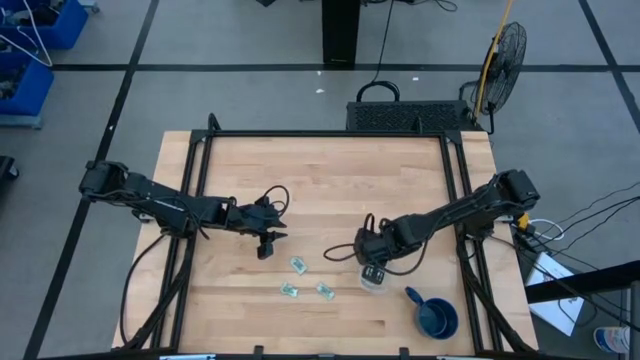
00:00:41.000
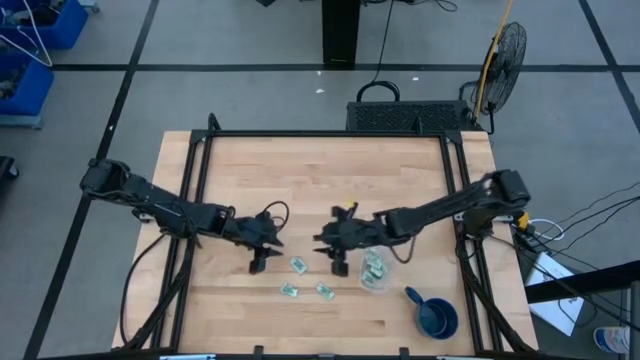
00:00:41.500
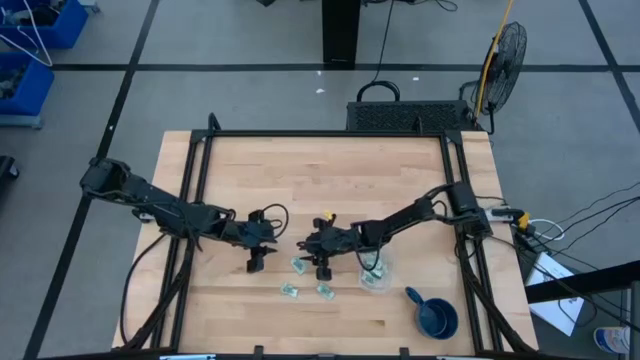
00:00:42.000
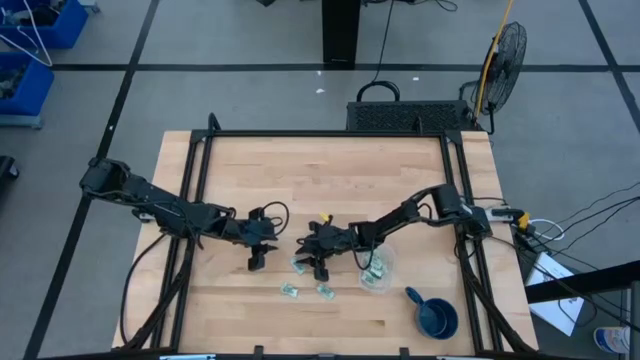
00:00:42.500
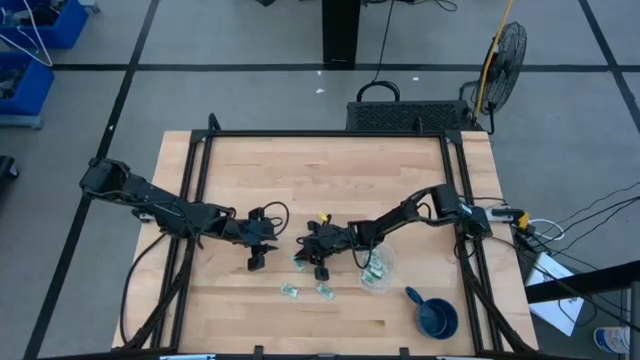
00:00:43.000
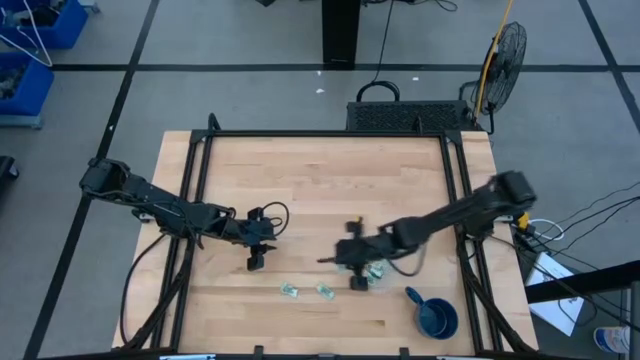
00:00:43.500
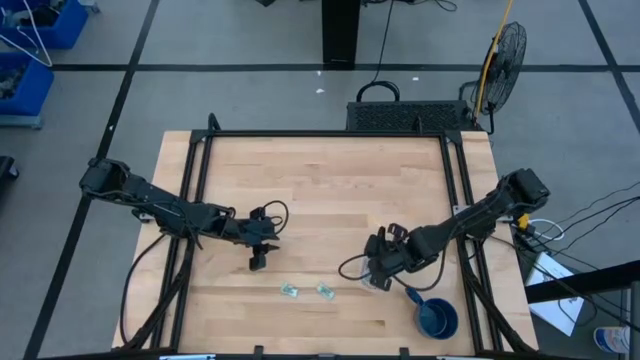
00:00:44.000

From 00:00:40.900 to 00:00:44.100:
Task: Pick and place Stevia / Truvia into bins
Put the stevia packet into the transparent container

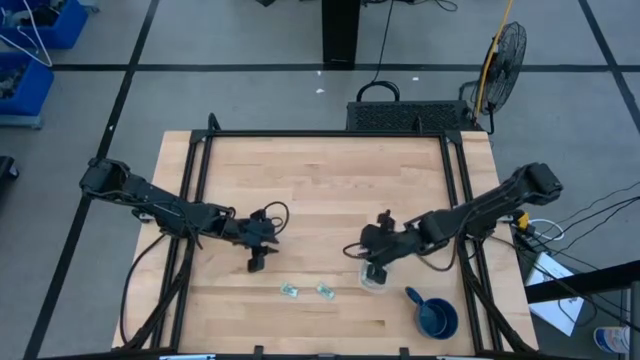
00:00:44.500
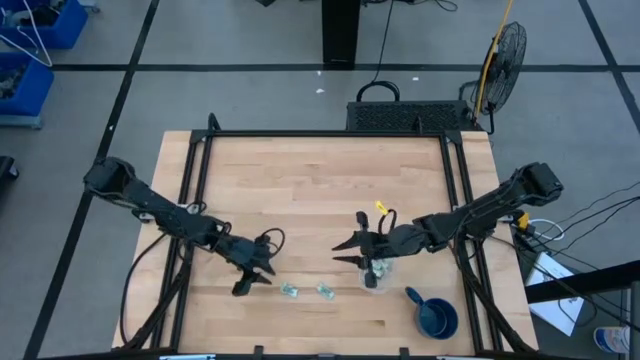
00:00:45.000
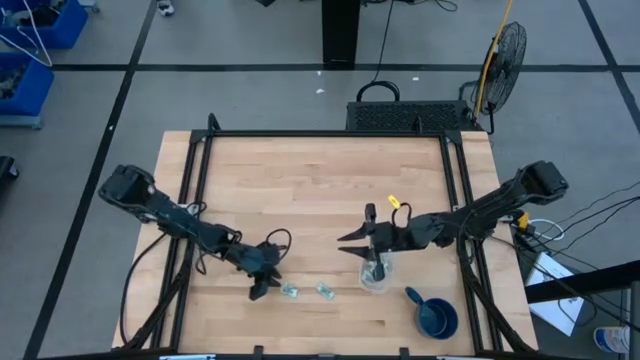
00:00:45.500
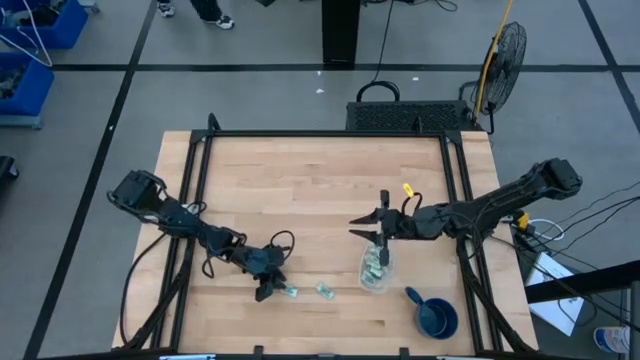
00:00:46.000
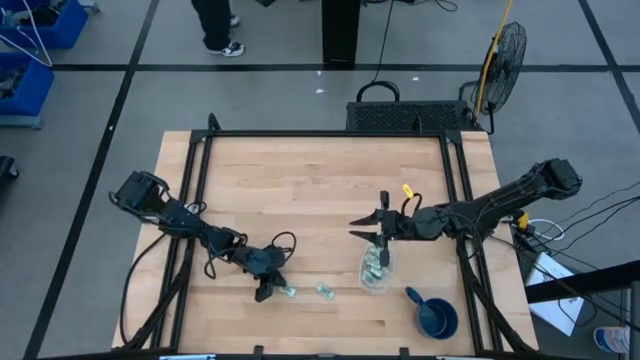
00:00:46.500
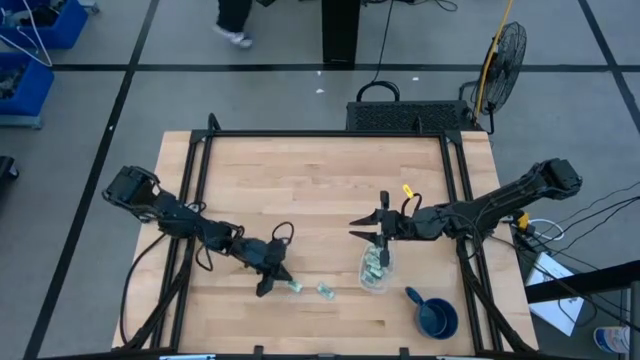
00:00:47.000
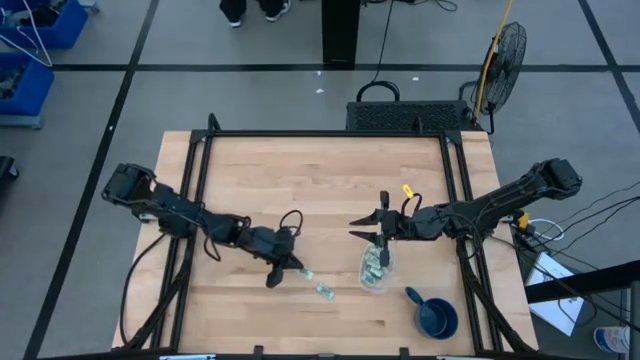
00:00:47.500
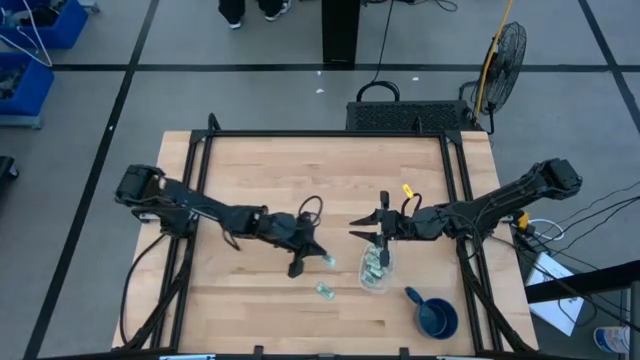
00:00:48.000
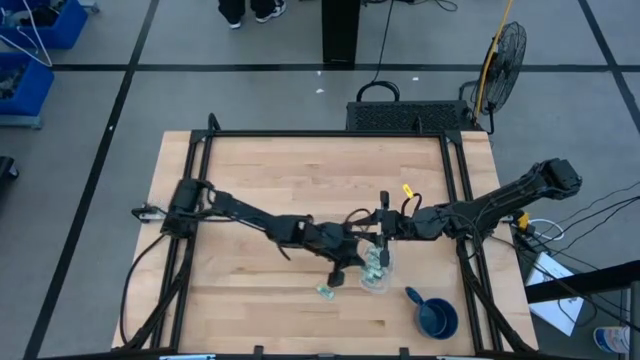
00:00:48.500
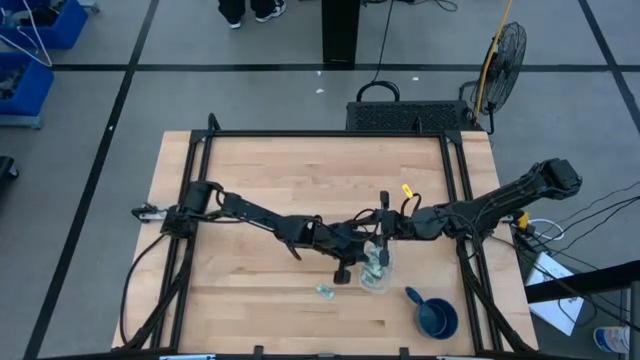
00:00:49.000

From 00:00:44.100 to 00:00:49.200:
Put the stevia packet into the transparent container

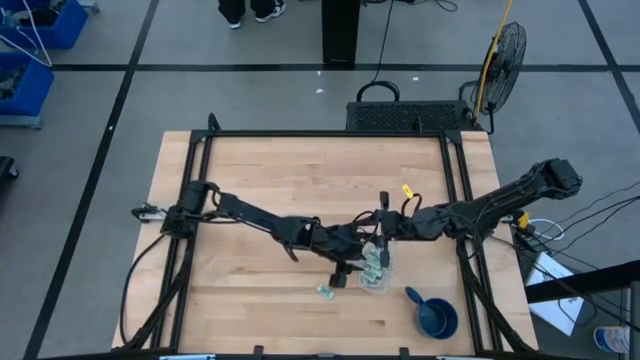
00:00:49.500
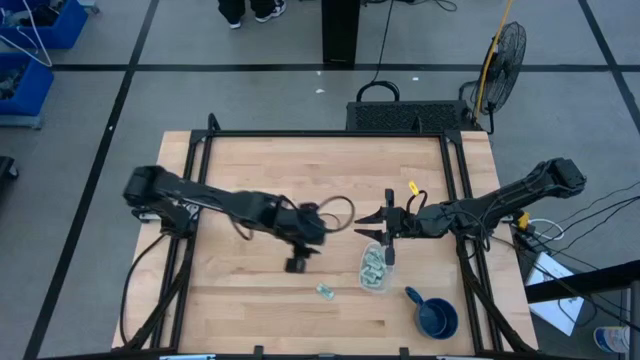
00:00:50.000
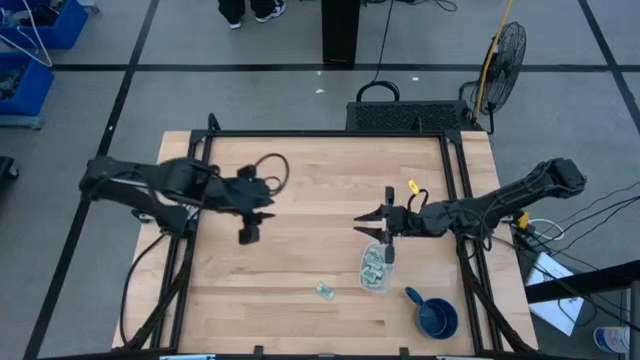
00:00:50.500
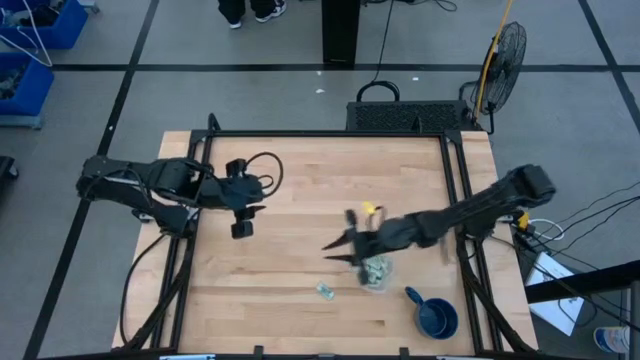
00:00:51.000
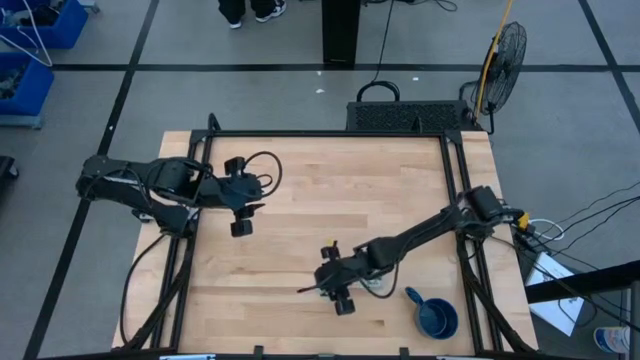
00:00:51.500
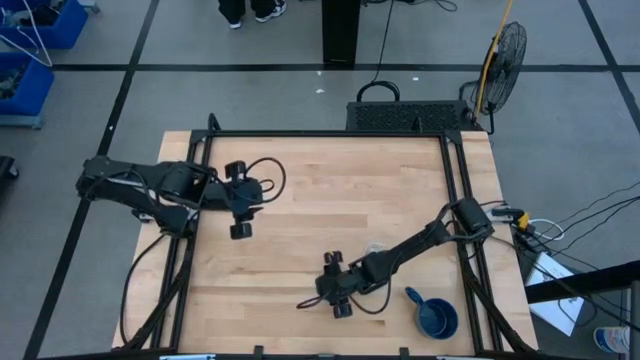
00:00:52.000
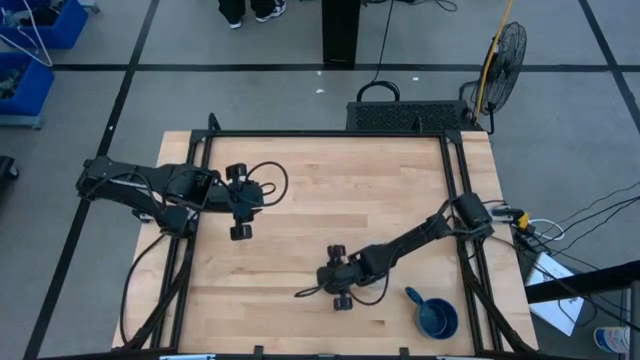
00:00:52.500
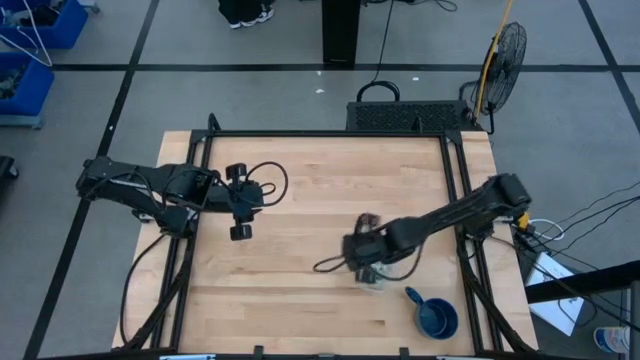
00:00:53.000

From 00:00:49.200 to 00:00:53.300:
Put the stevia packet into the transparent container

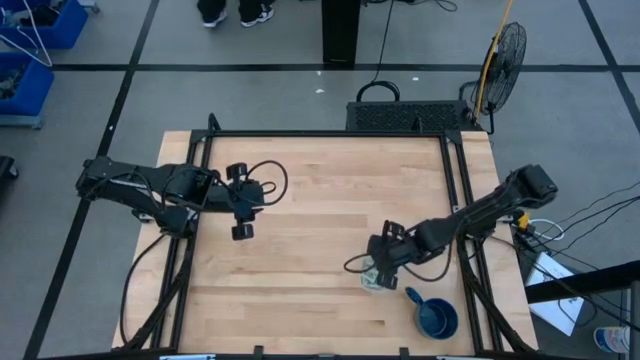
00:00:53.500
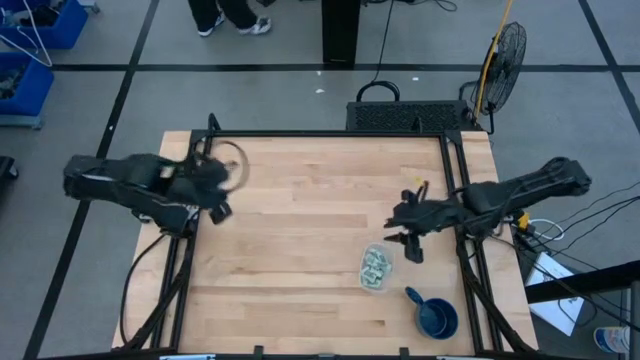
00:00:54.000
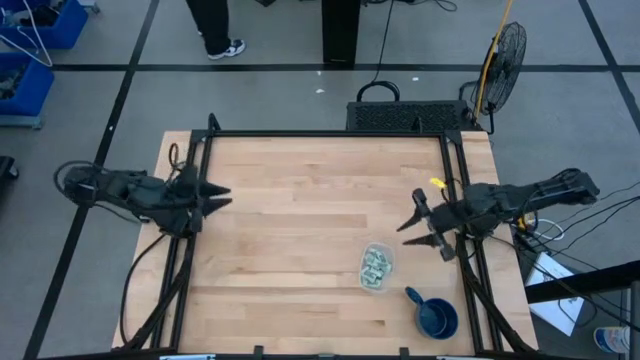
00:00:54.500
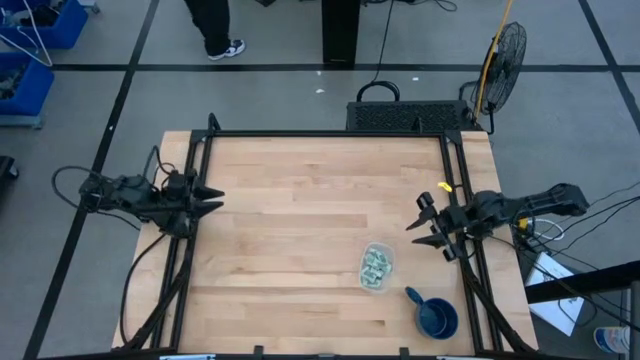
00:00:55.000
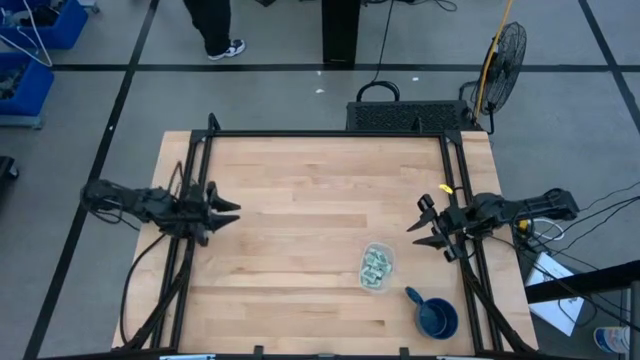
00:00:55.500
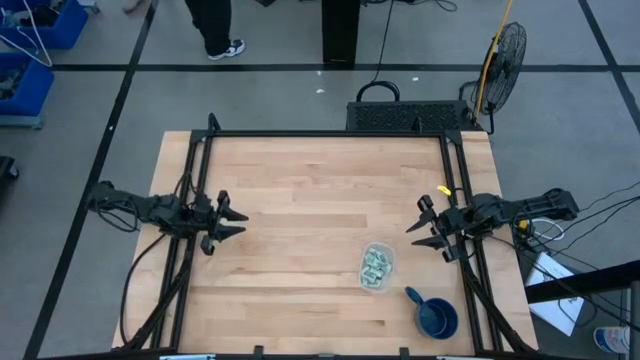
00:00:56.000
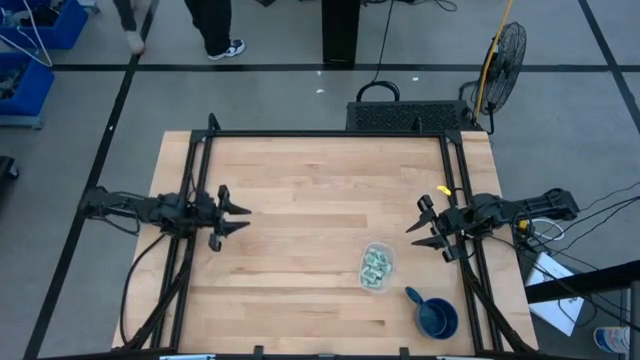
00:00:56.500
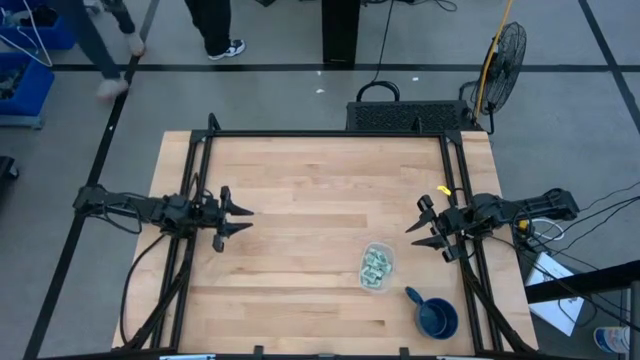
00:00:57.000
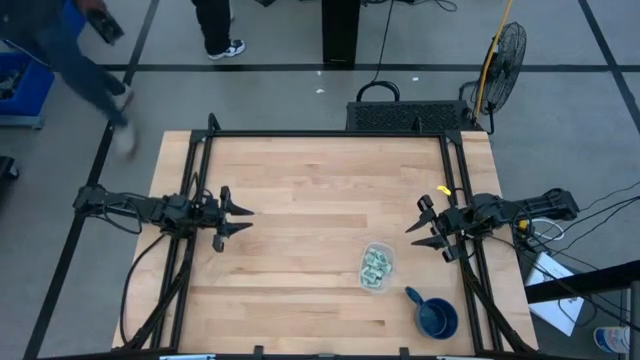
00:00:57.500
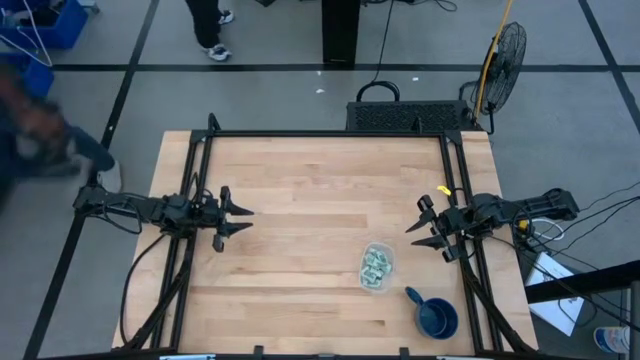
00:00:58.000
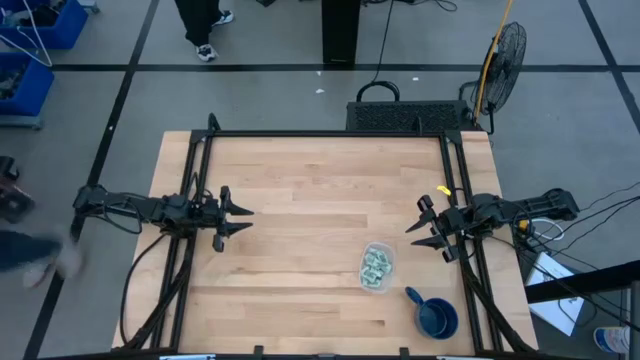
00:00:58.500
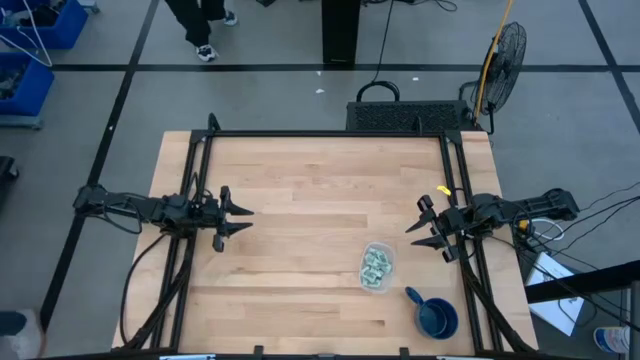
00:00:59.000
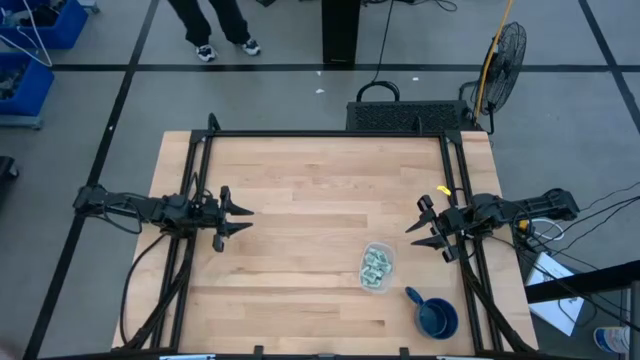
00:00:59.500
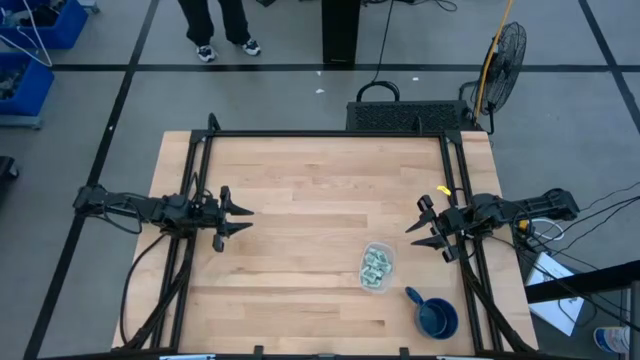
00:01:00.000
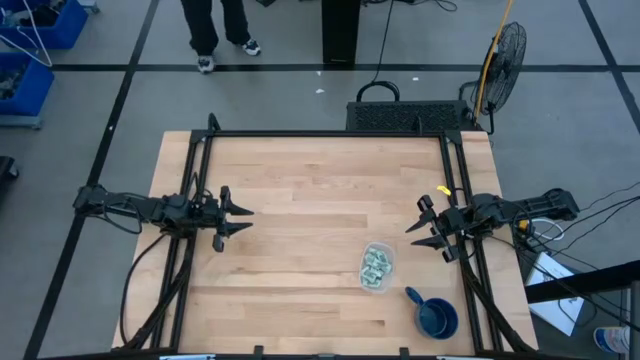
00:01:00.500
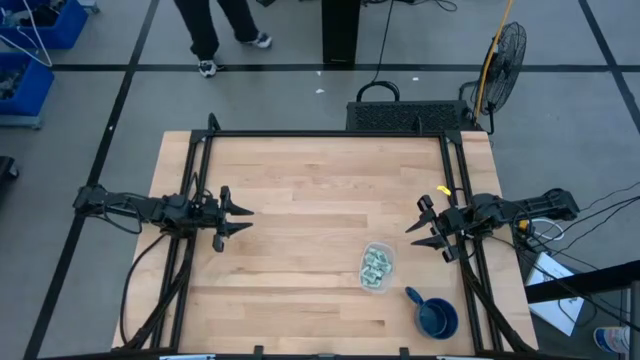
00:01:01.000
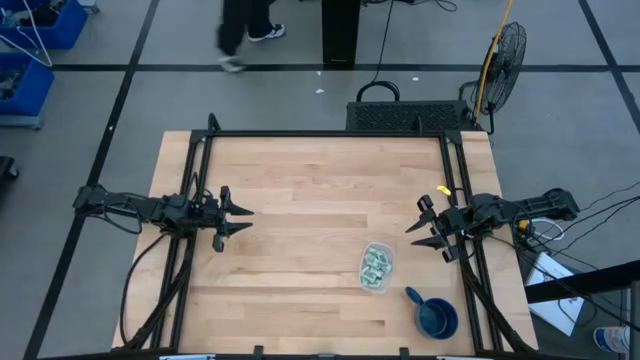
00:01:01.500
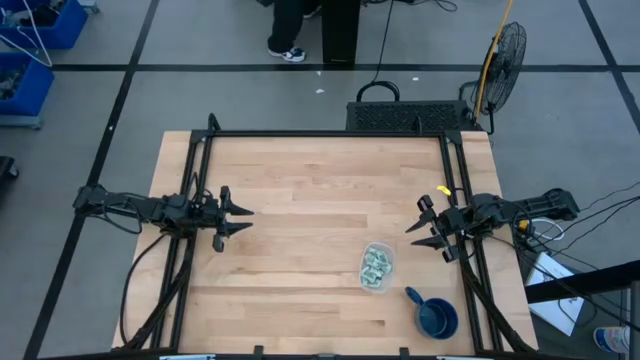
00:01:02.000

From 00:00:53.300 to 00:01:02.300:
Return to Home Position
